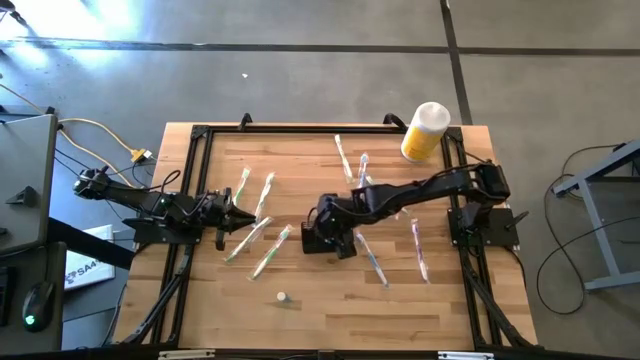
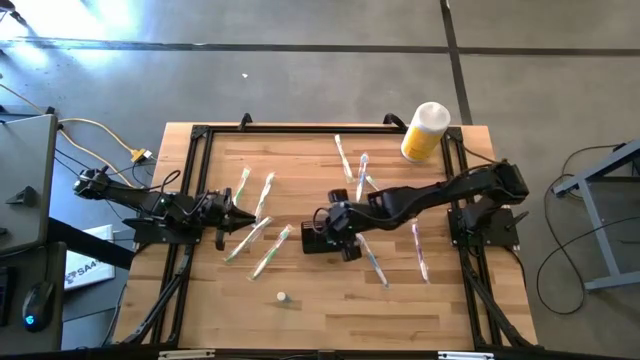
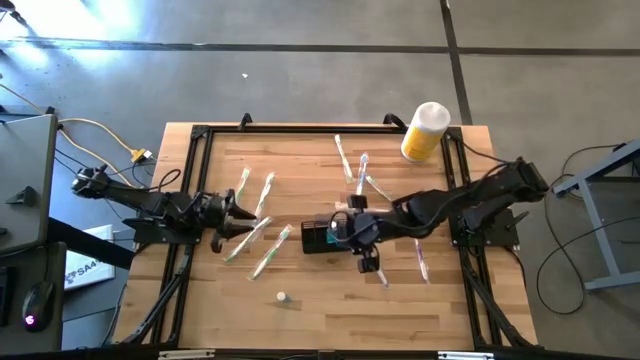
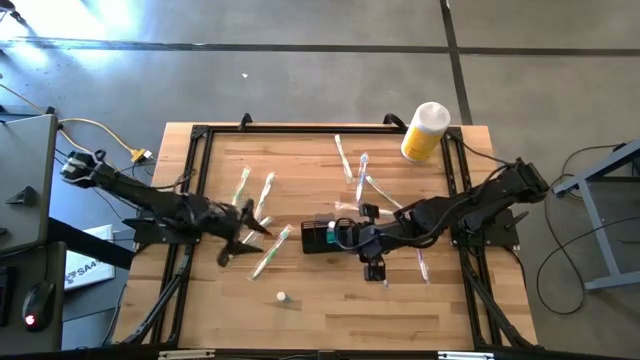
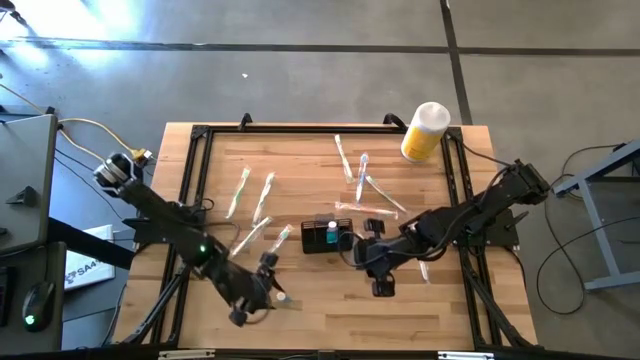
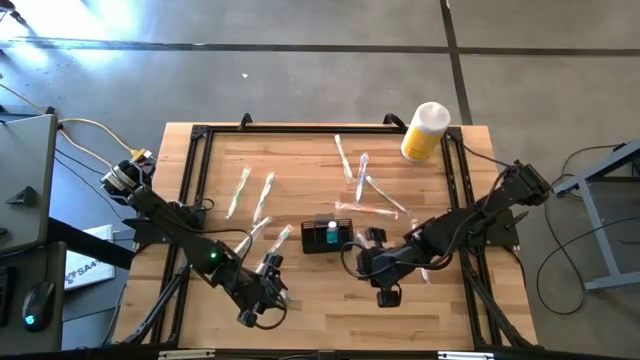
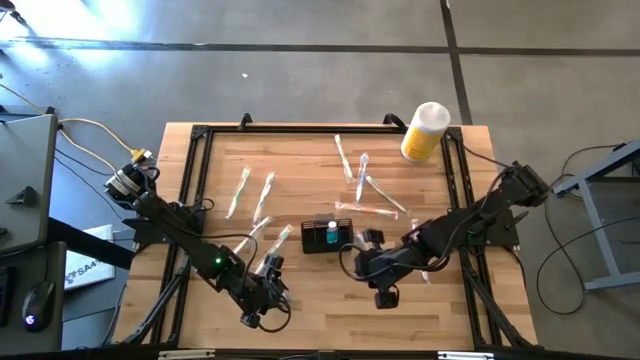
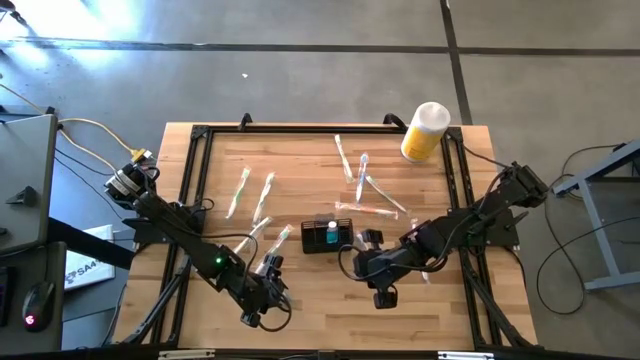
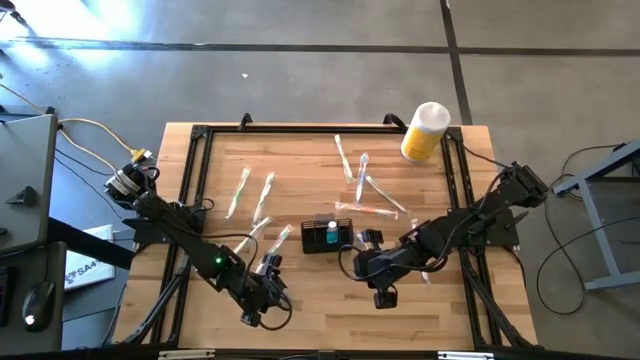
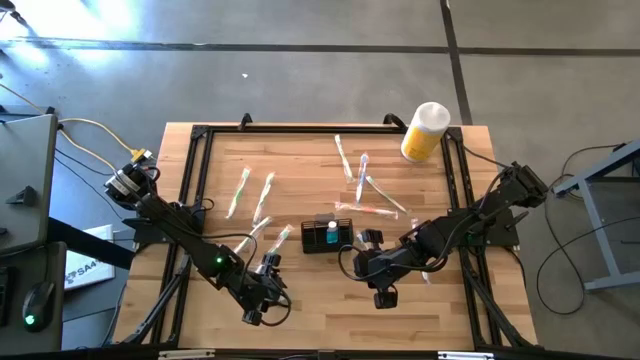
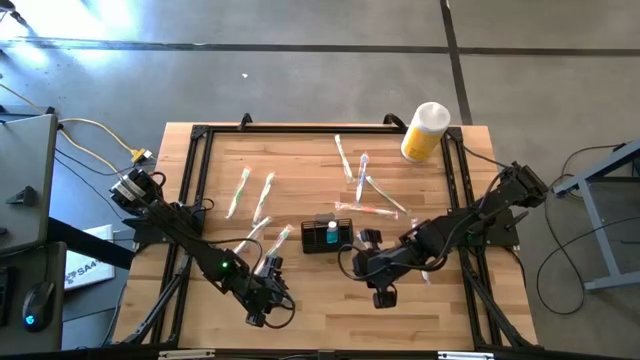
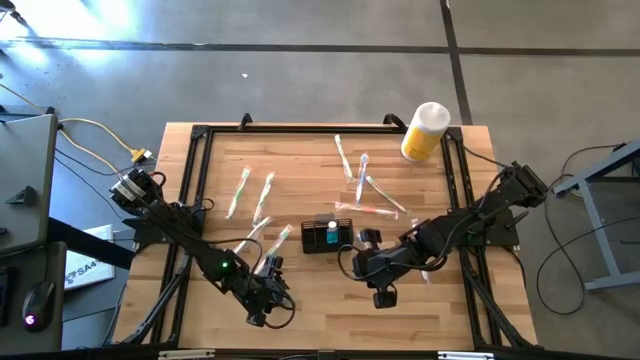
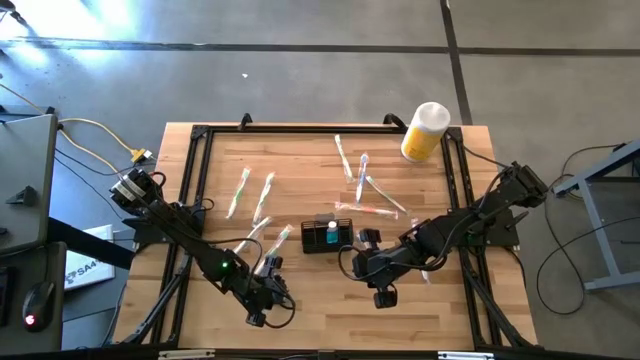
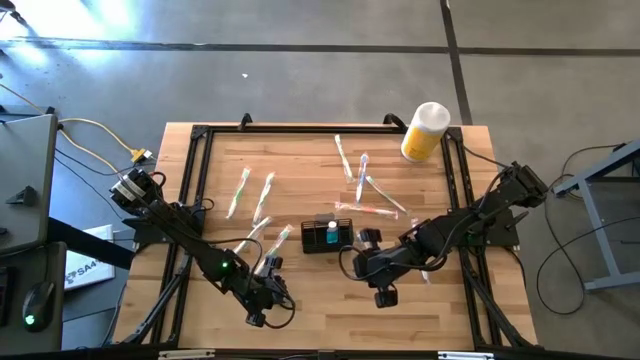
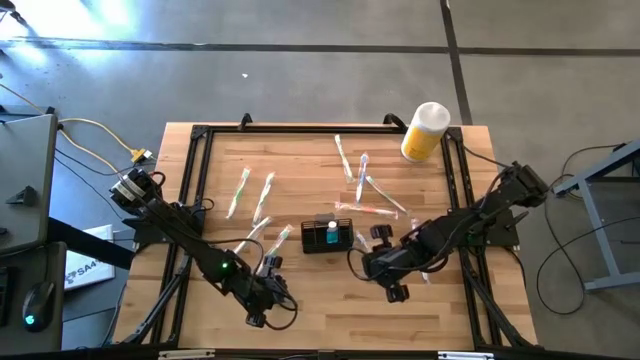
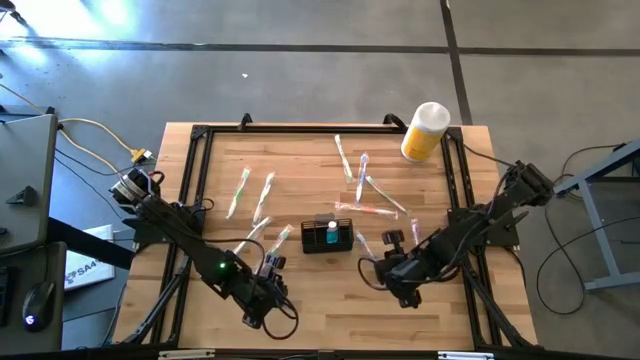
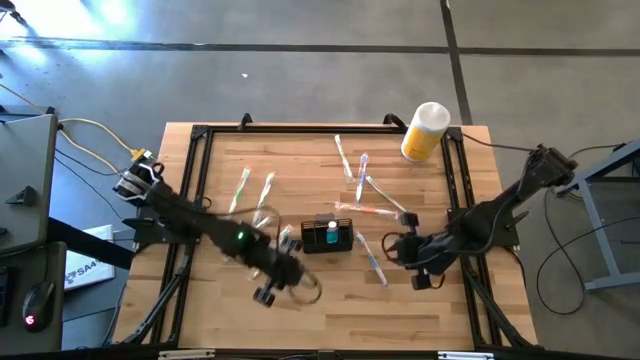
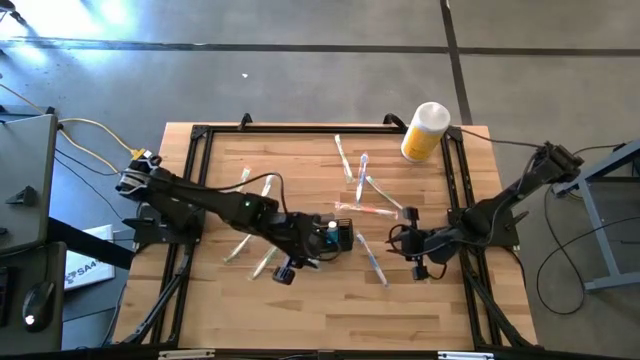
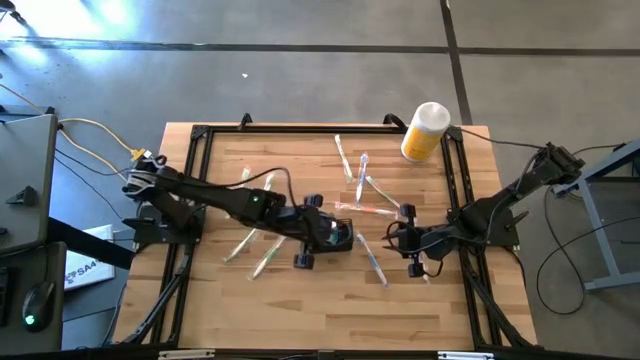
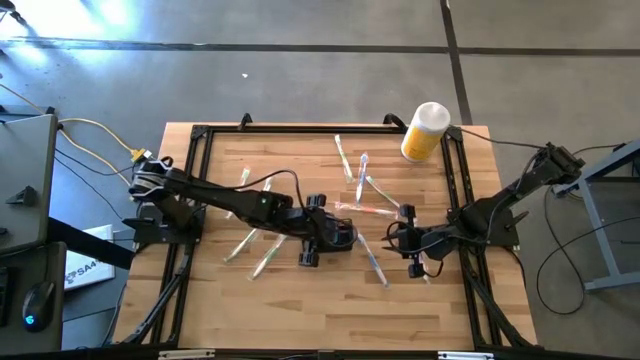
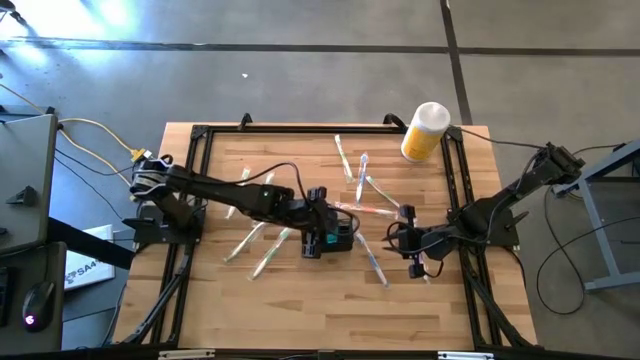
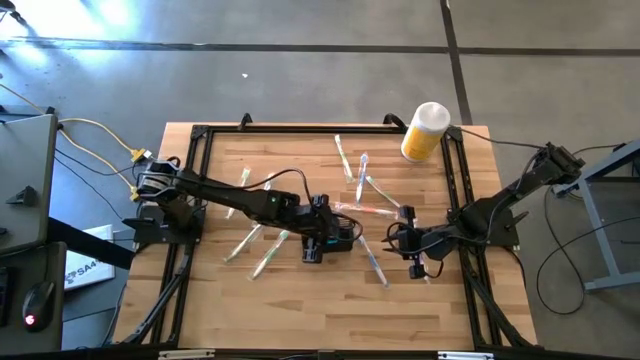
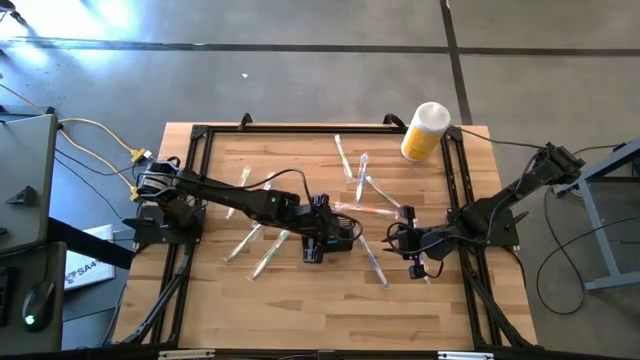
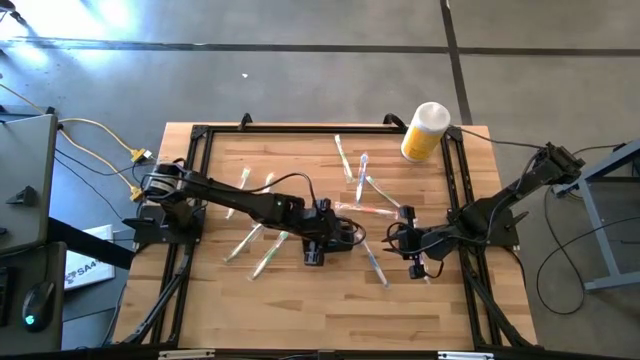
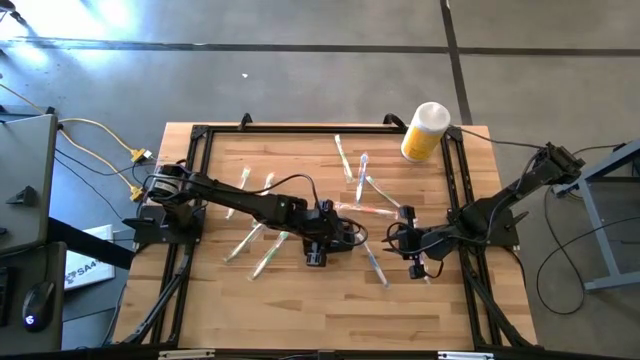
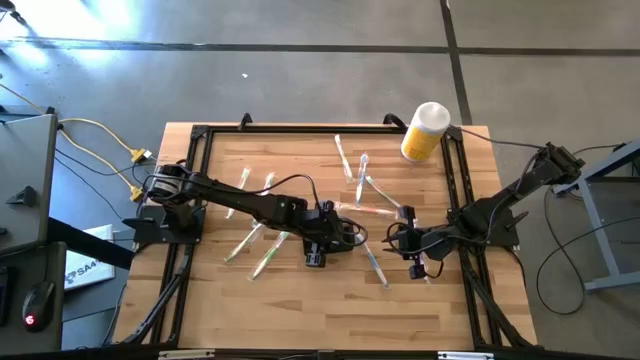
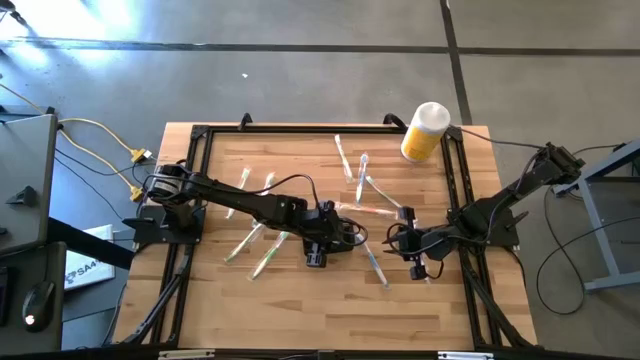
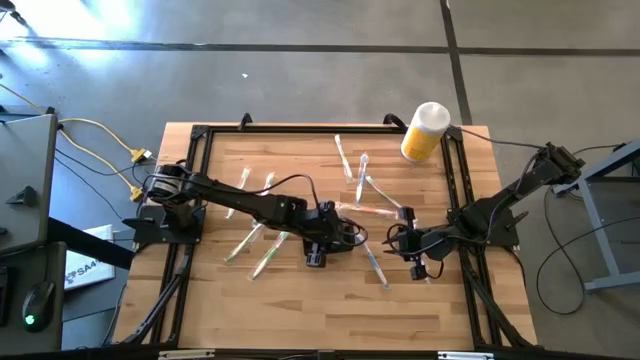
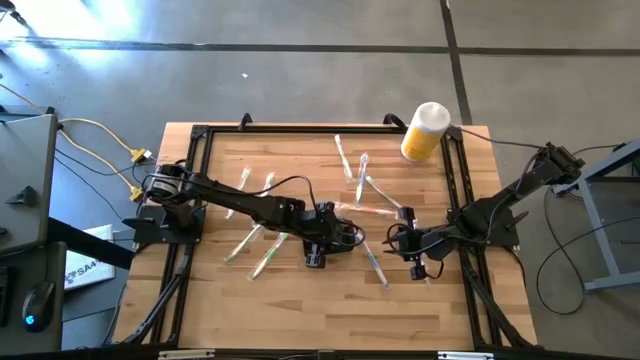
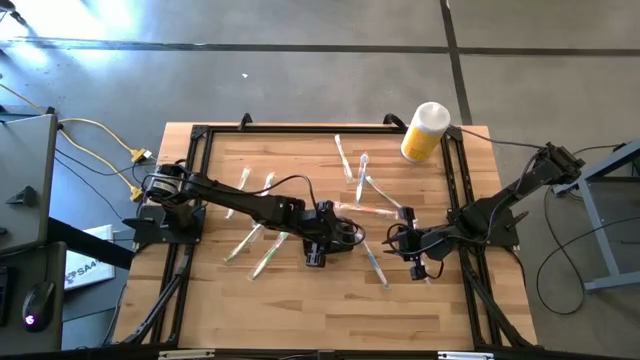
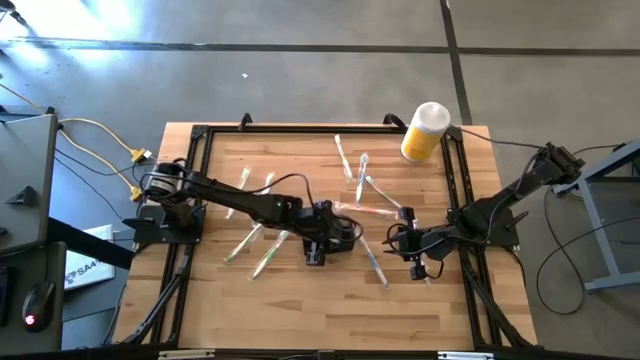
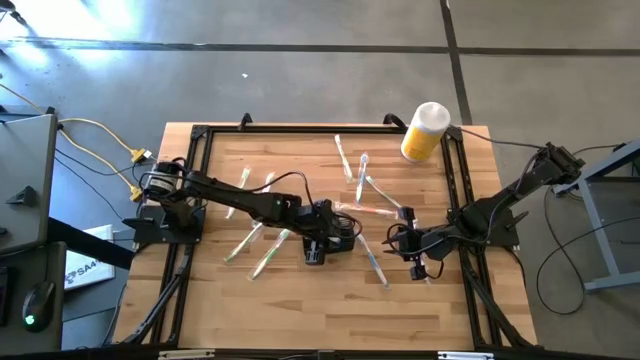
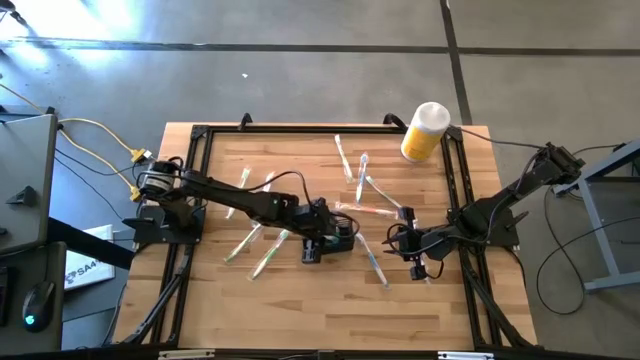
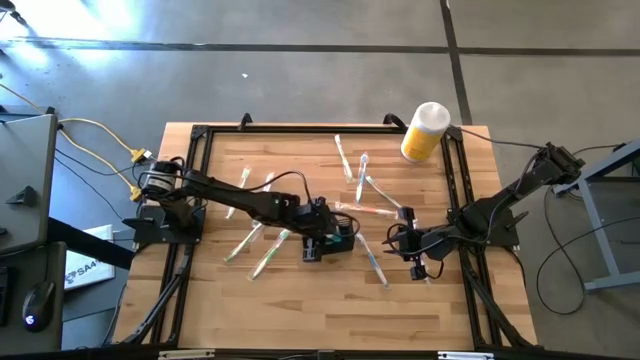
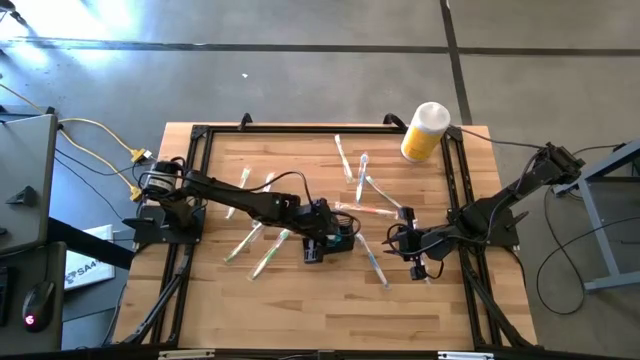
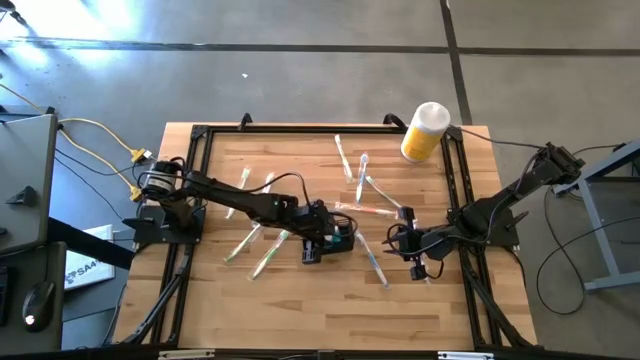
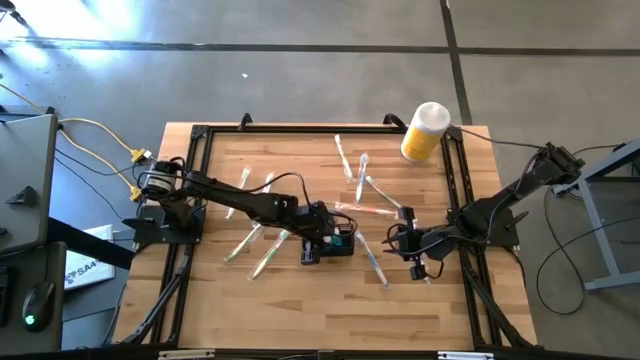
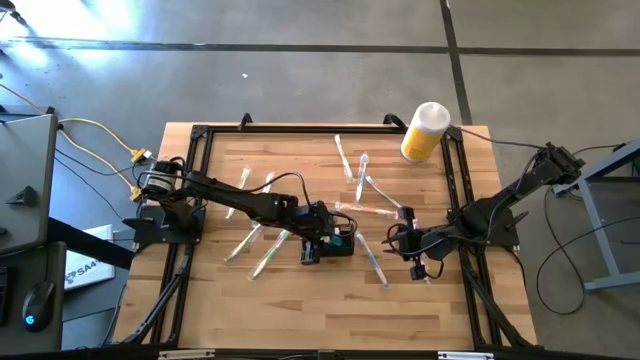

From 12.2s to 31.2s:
Task: Pick & Place toothbrushing station
Put the mouthwash bottle into the wire organizer
